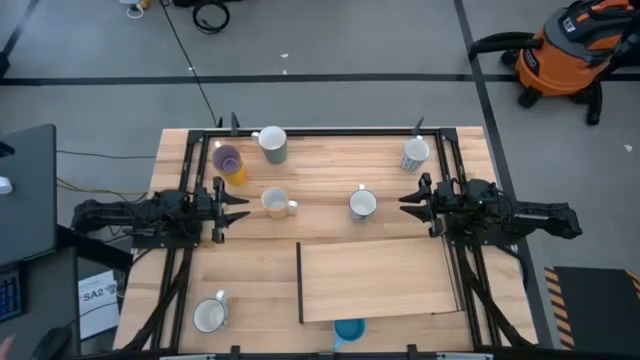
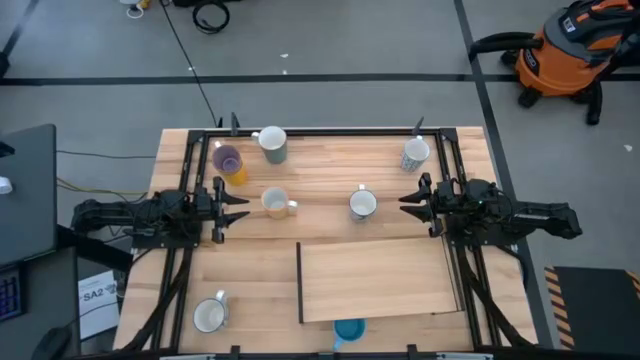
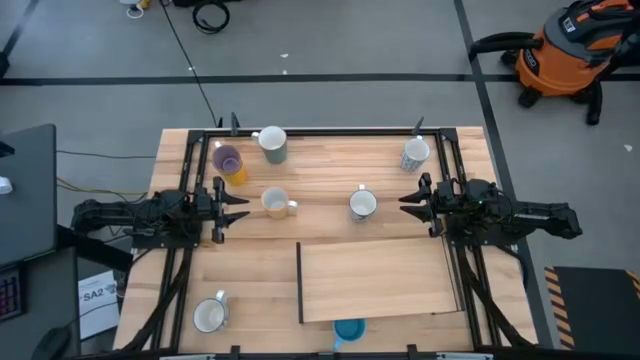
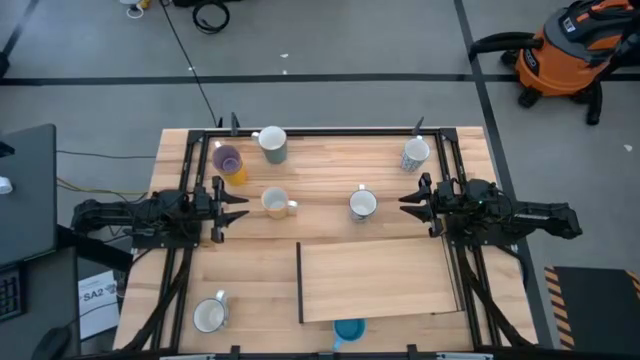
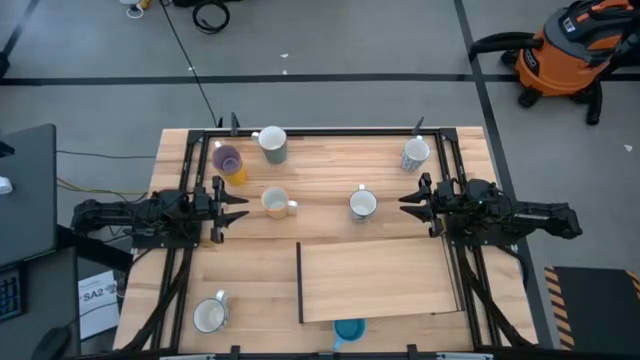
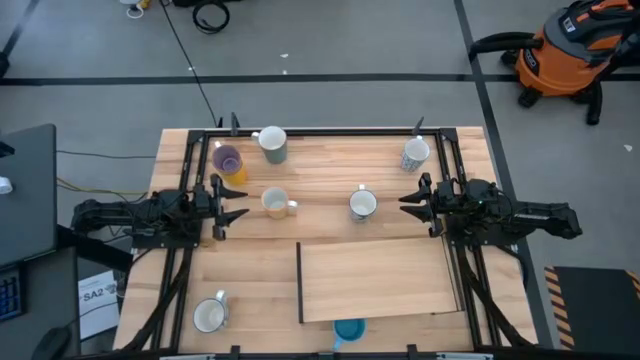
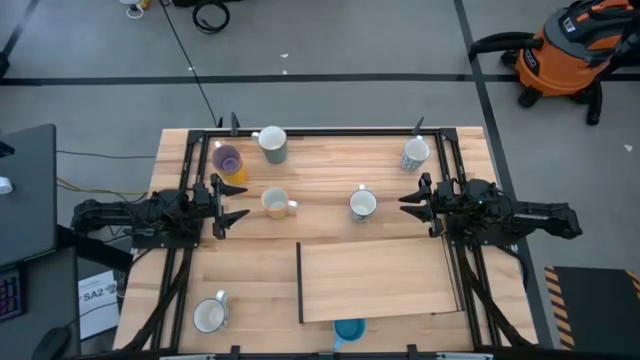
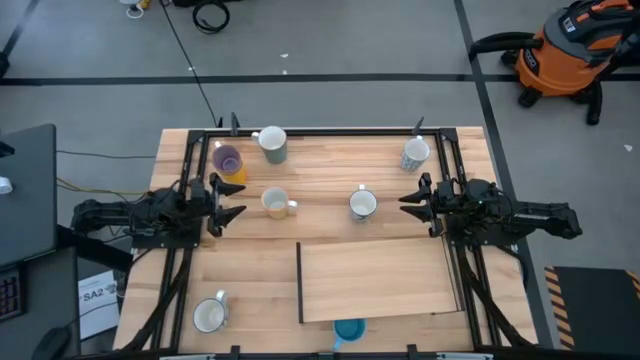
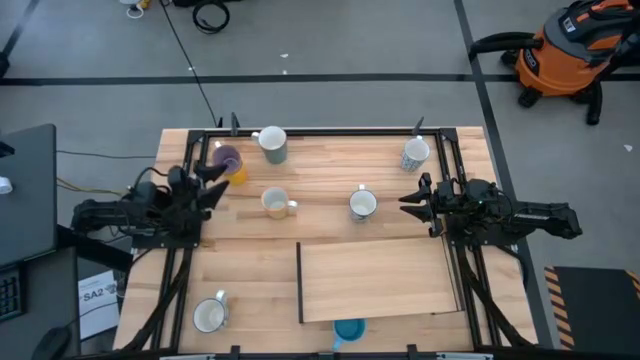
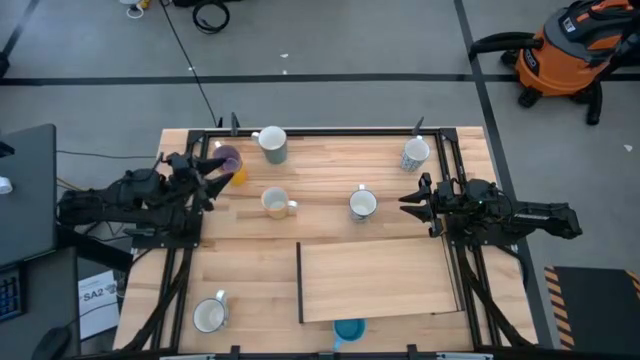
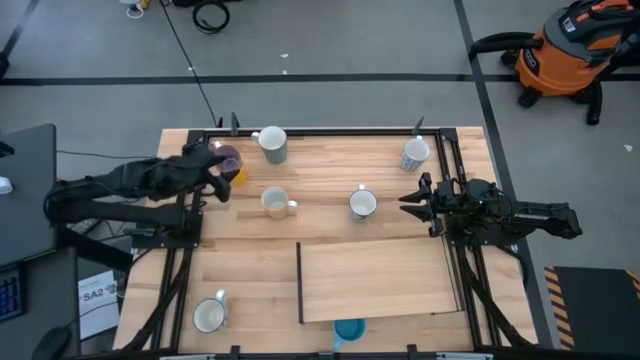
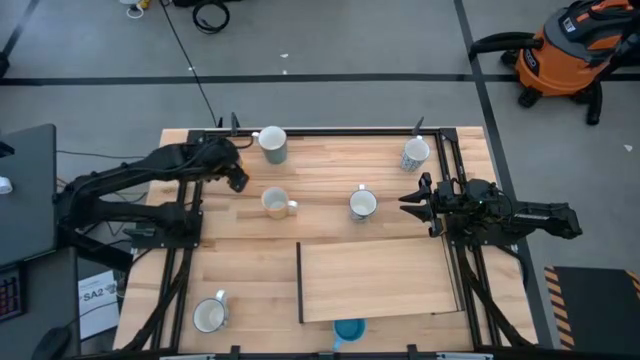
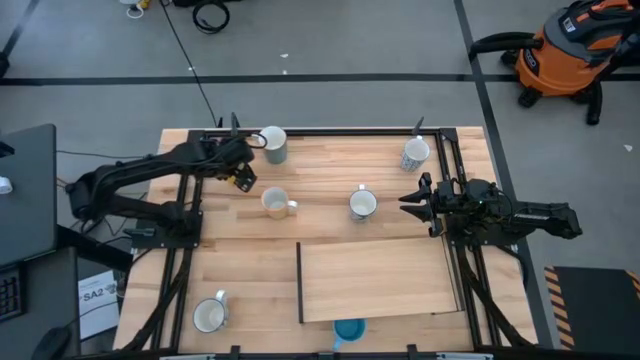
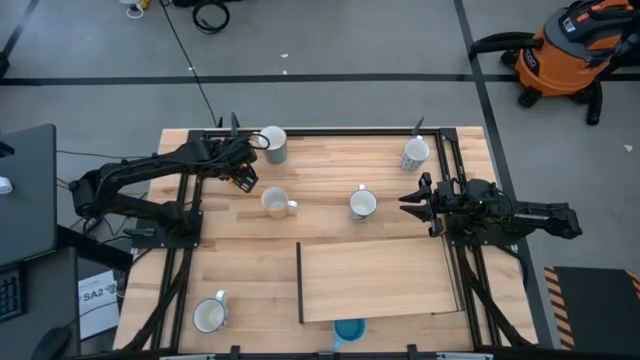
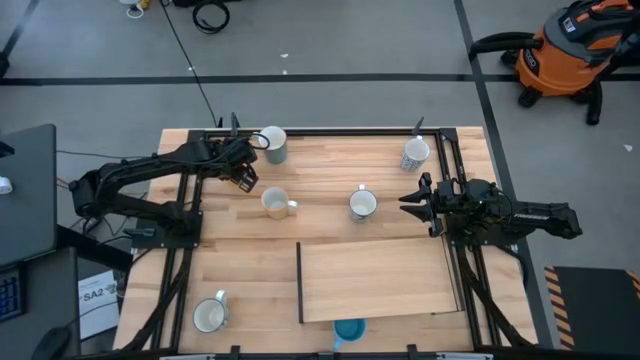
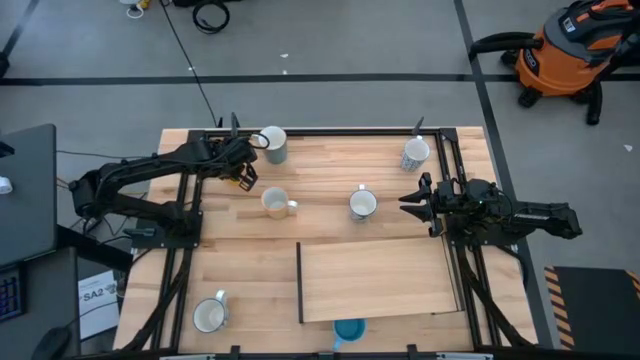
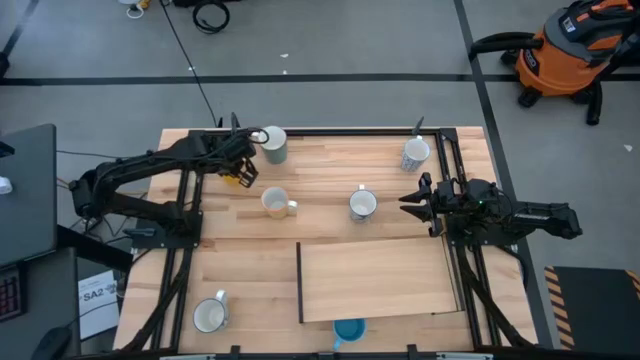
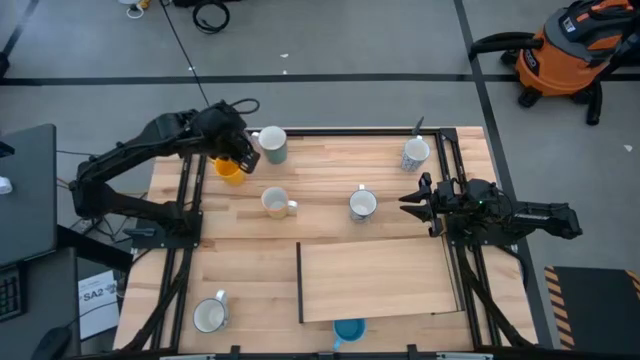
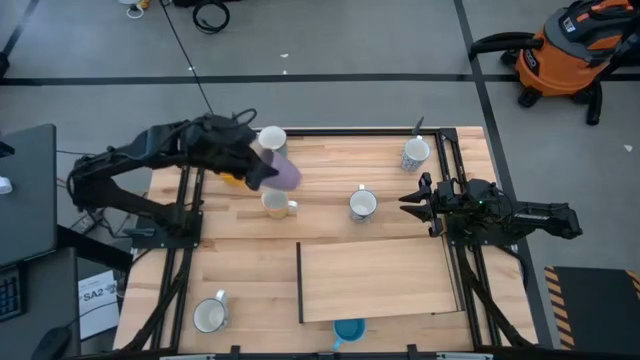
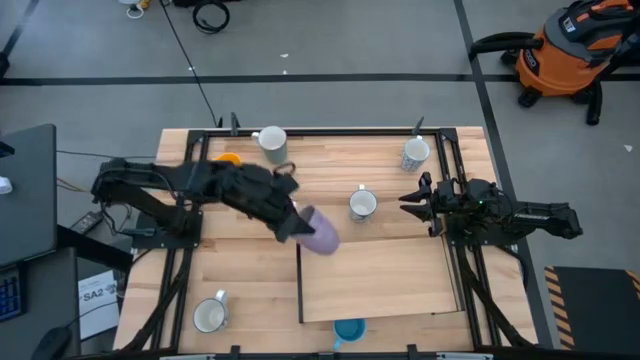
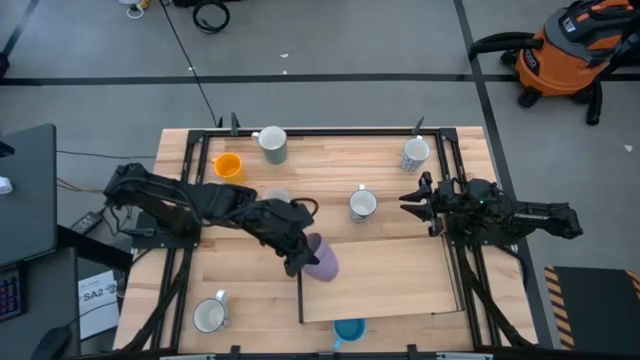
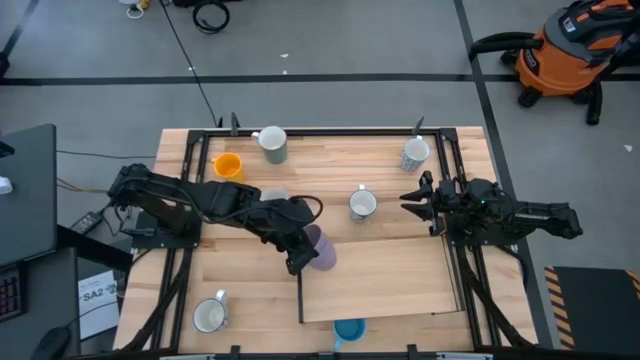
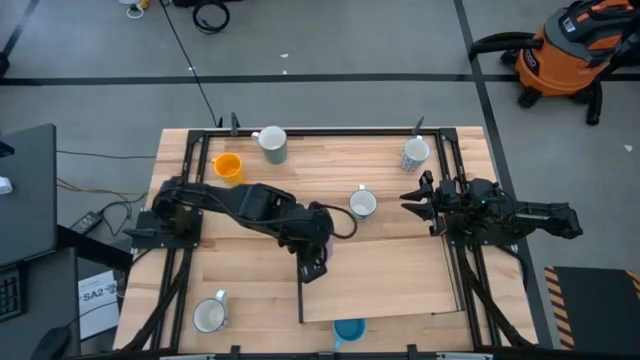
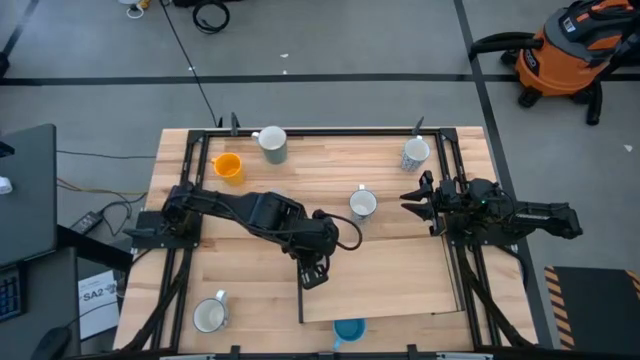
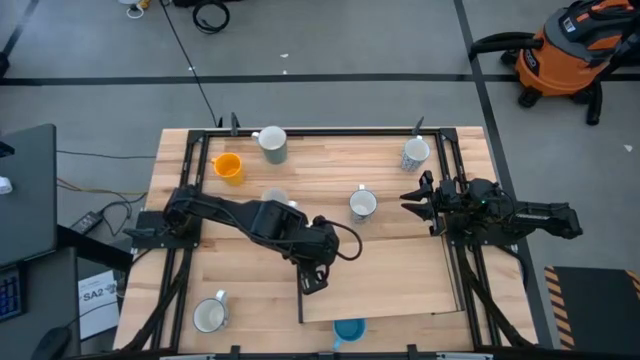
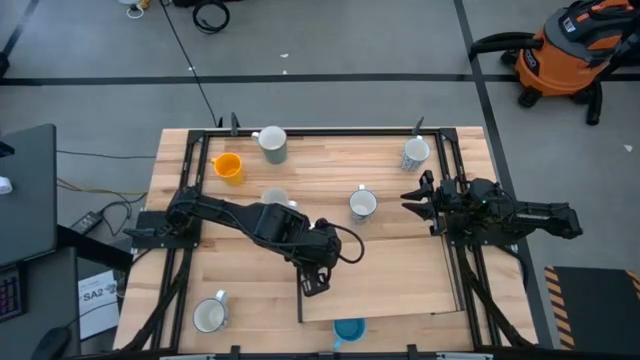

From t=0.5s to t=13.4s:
Task: Place coffee mugs
Put the purple mug on the shelf
